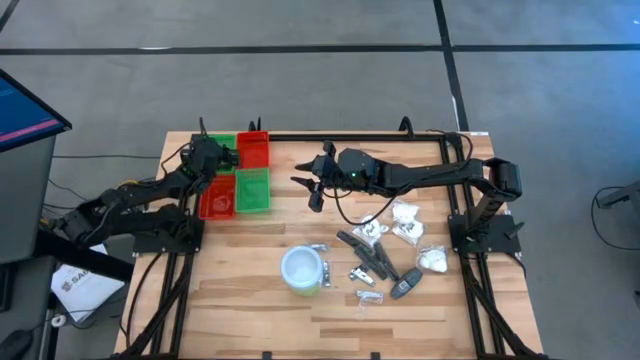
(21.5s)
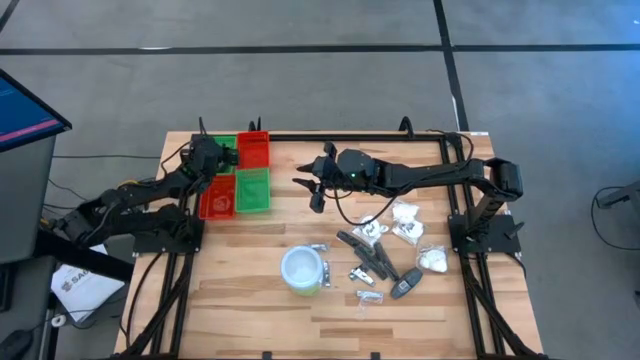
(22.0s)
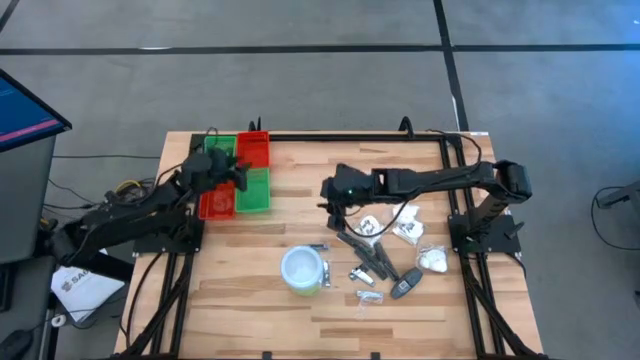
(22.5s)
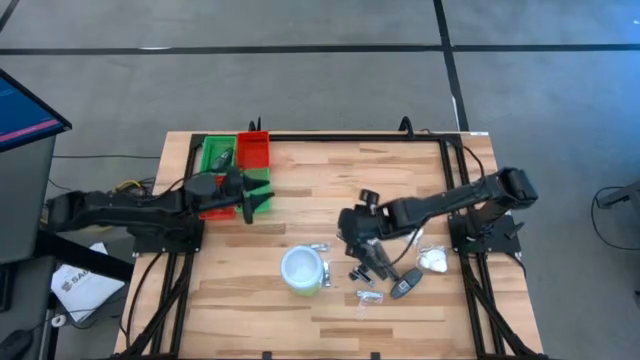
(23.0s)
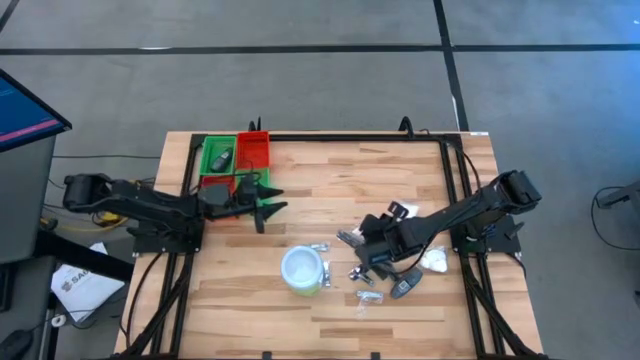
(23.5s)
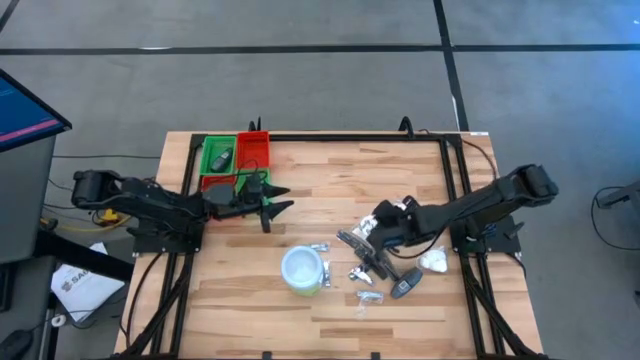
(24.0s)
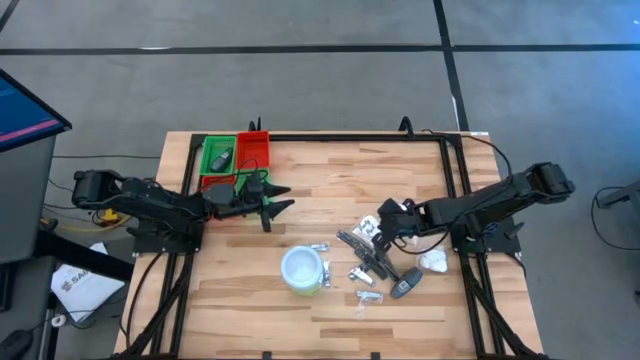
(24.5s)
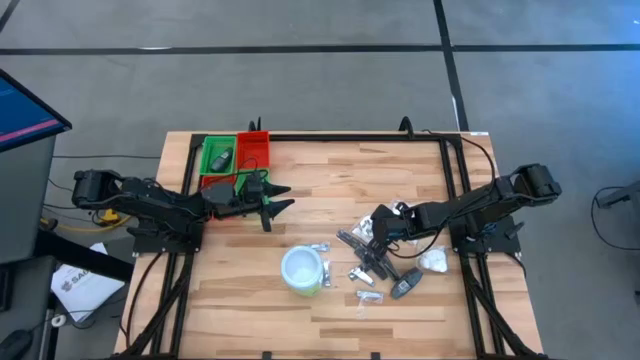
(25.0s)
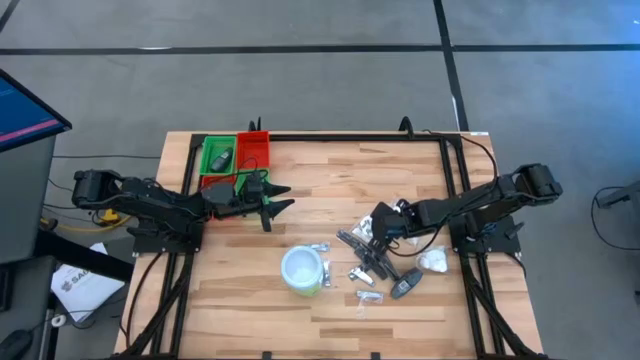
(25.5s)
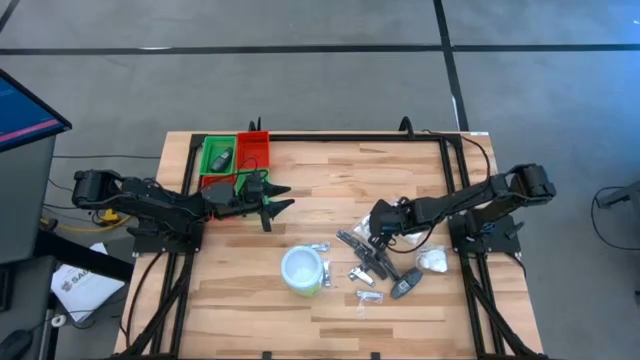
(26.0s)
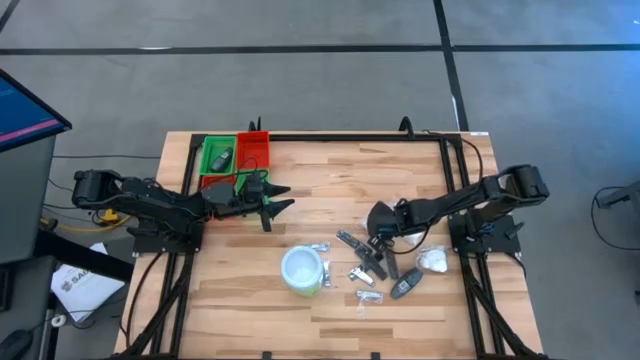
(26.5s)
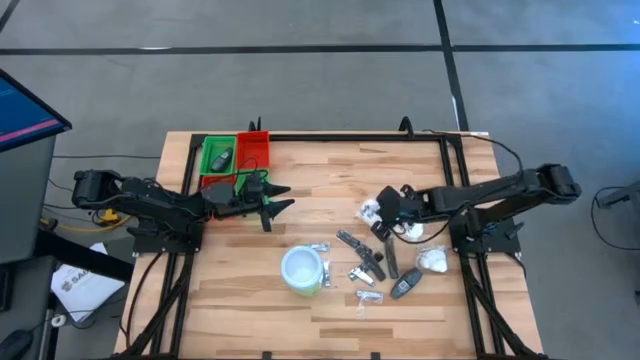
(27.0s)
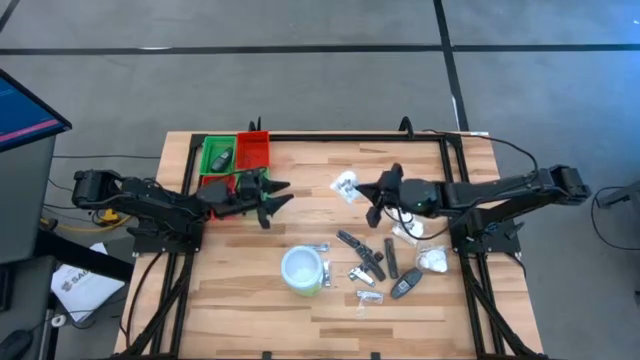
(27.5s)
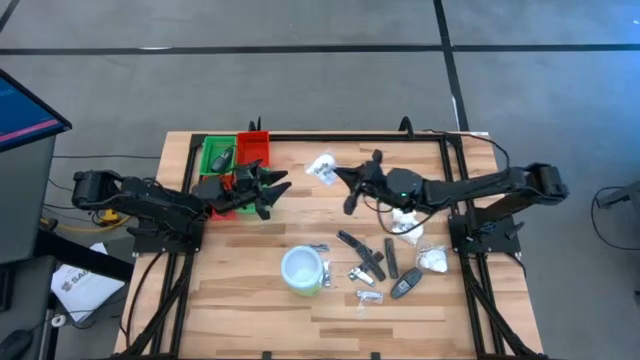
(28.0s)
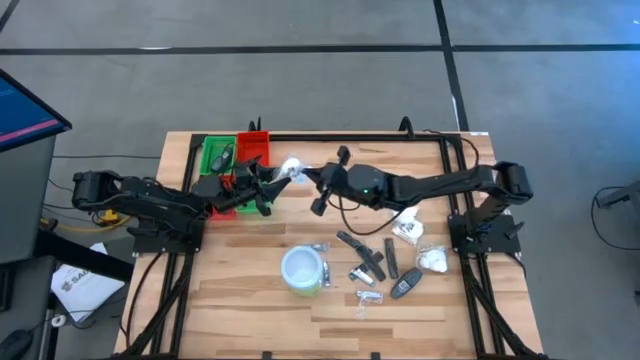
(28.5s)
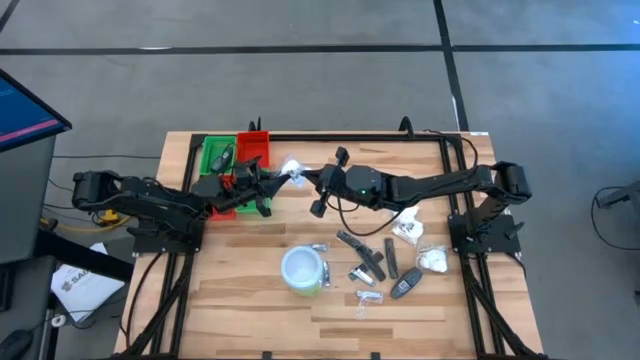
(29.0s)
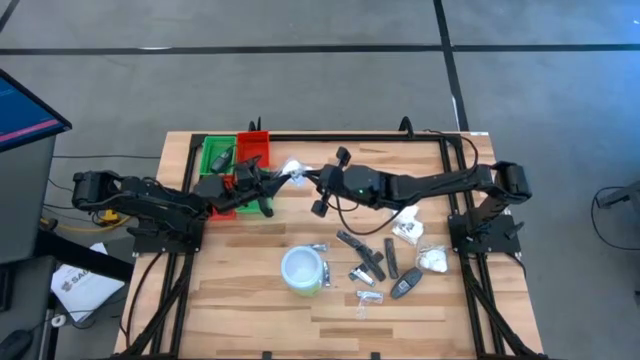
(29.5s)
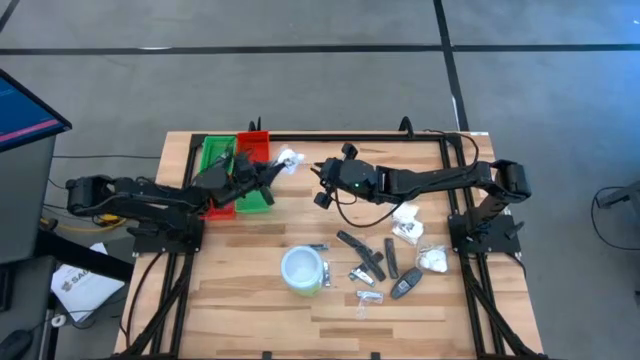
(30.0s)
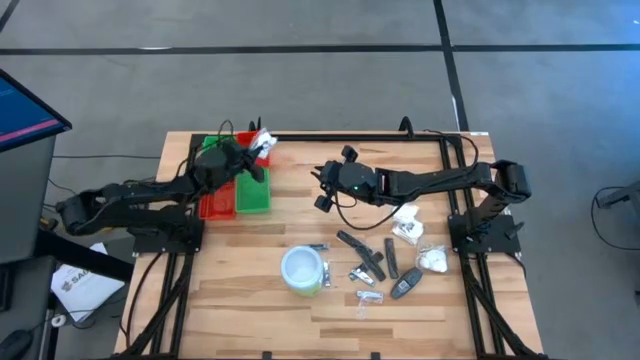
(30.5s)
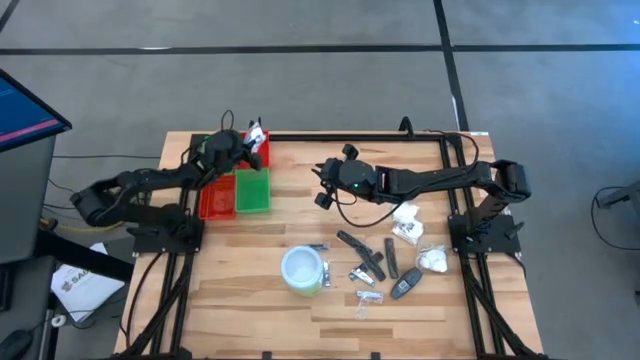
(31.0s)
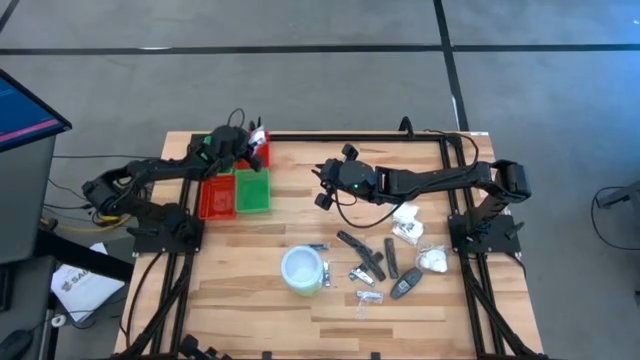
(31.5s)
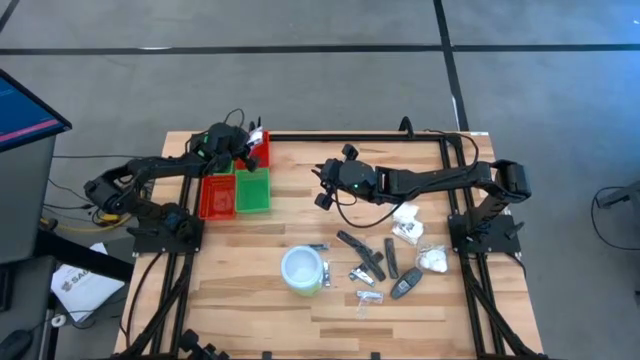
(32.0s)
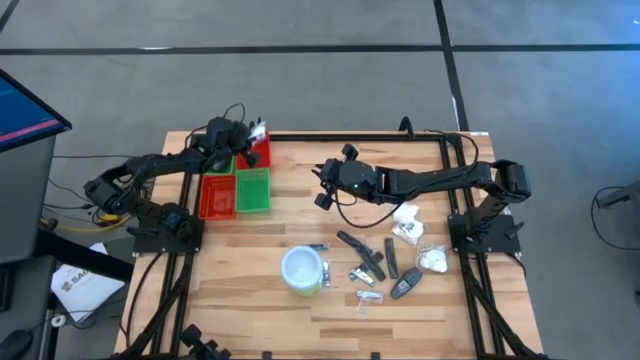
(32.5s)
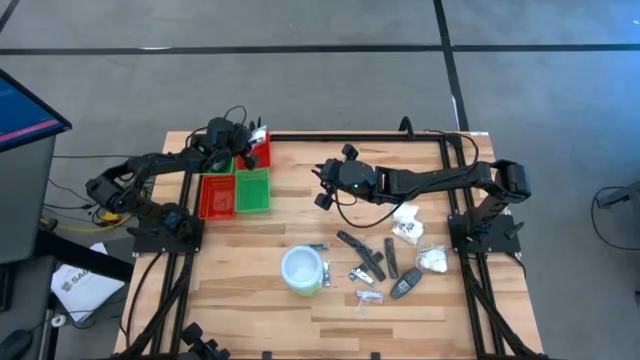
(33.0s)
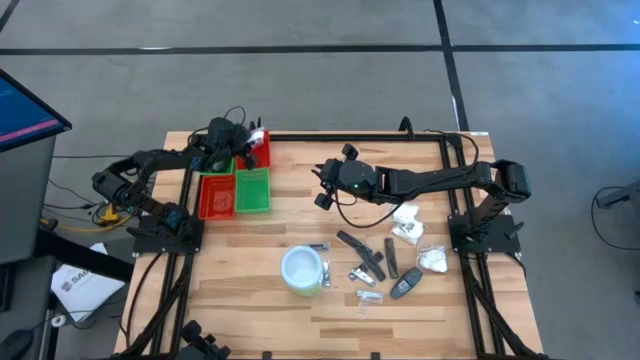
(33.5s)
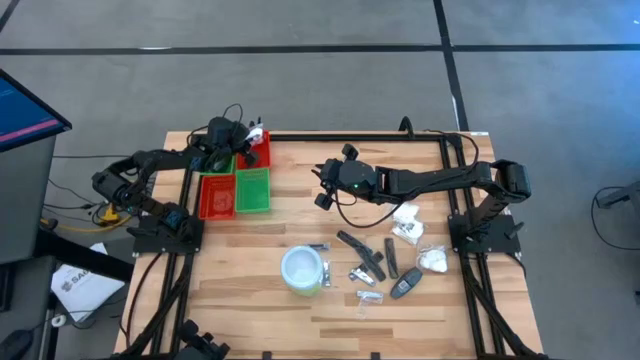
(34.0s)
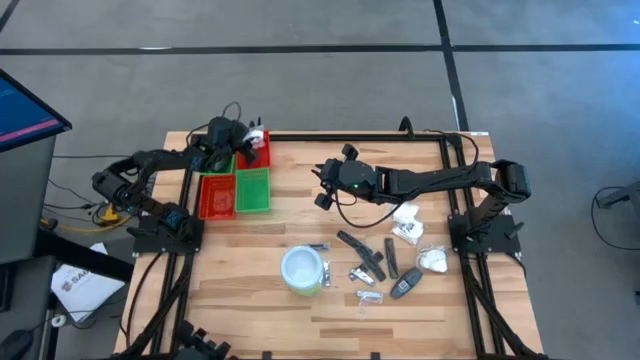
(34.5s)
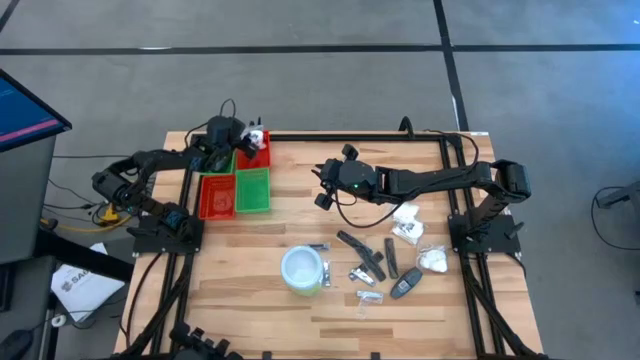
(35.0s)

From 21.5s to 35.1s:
Task: Pick & Place Travel size toiletries
Put the white cotton pack into the top red bin

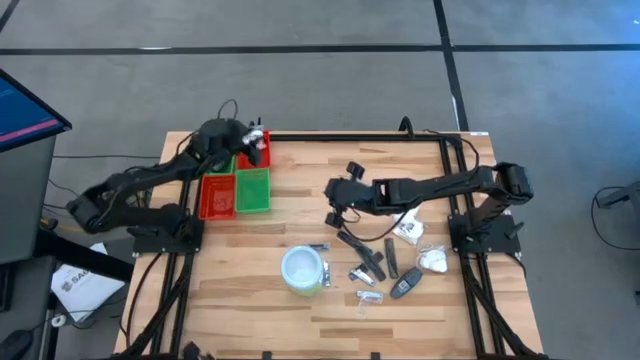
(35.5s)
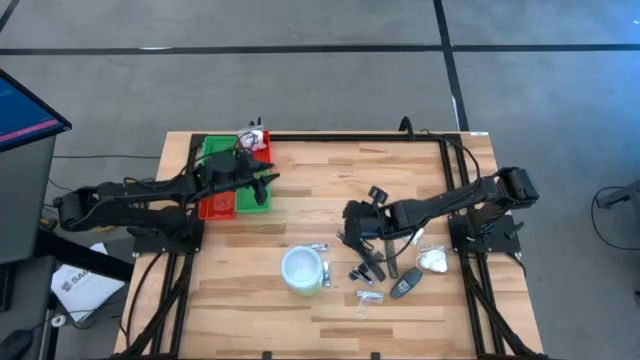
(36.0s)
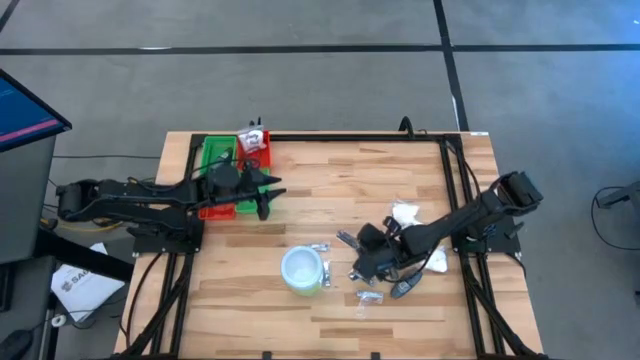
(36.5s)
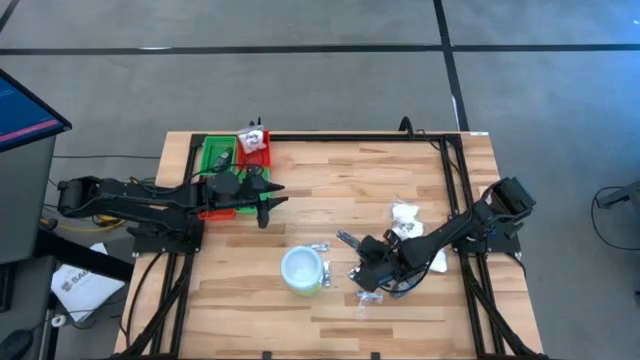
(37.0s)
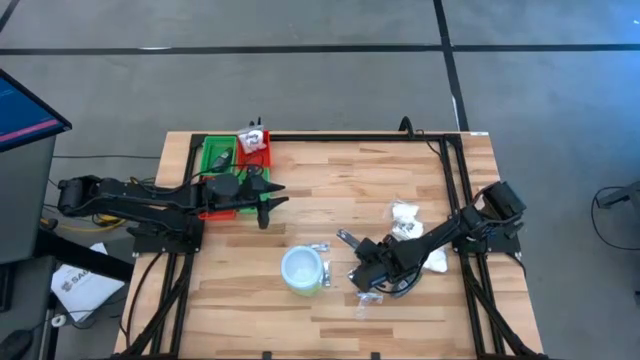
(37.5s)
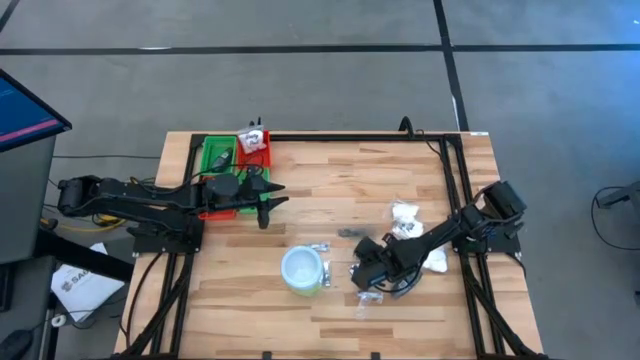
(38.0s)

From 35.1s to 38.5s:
Put the black comb into the bottom green bin

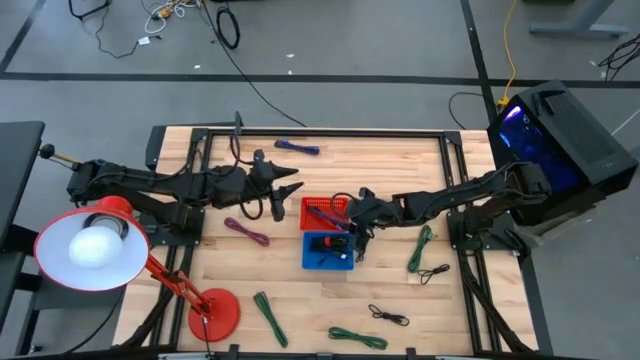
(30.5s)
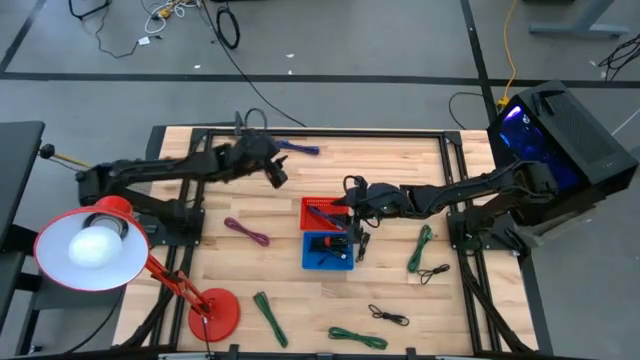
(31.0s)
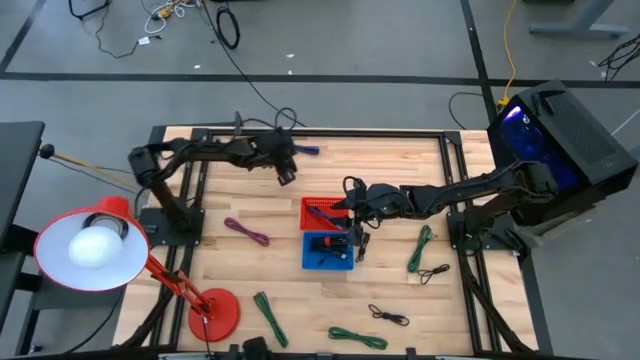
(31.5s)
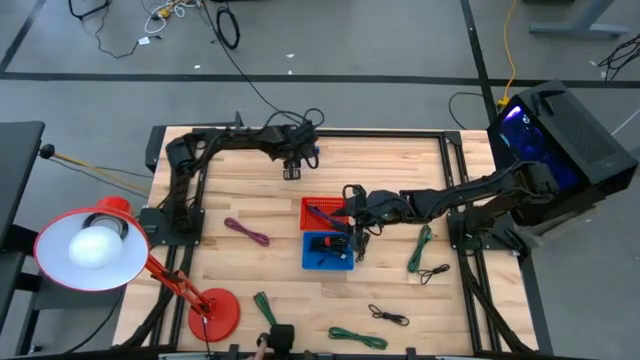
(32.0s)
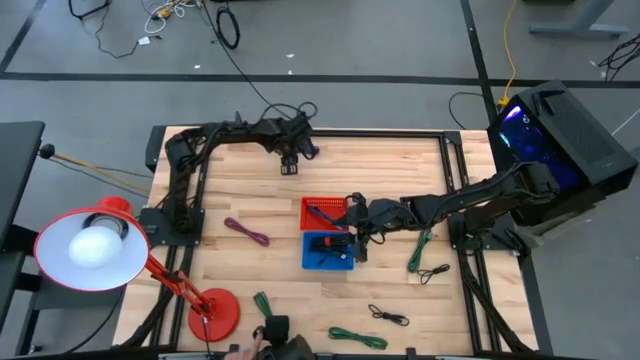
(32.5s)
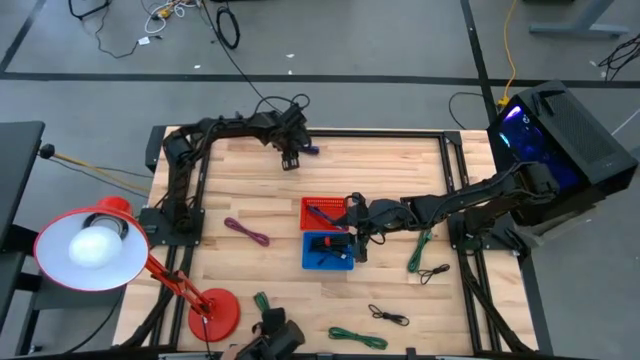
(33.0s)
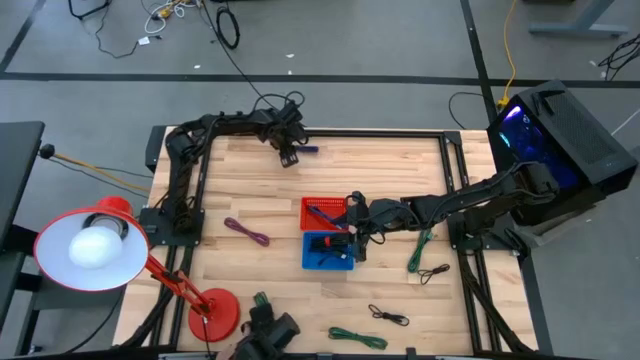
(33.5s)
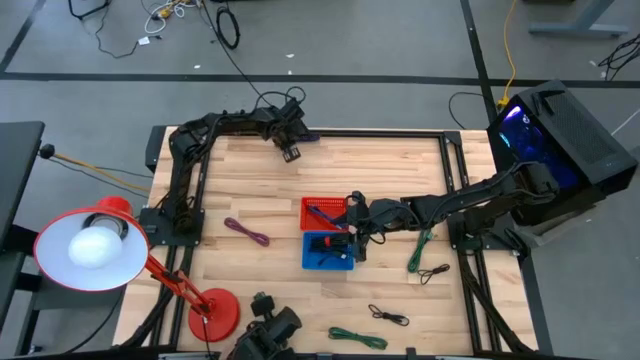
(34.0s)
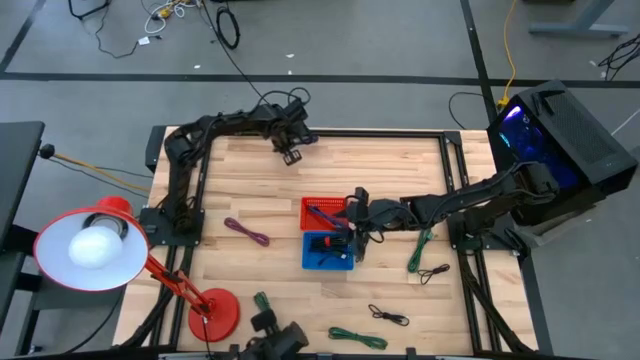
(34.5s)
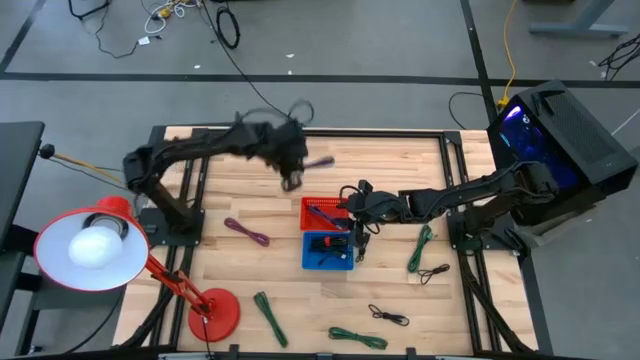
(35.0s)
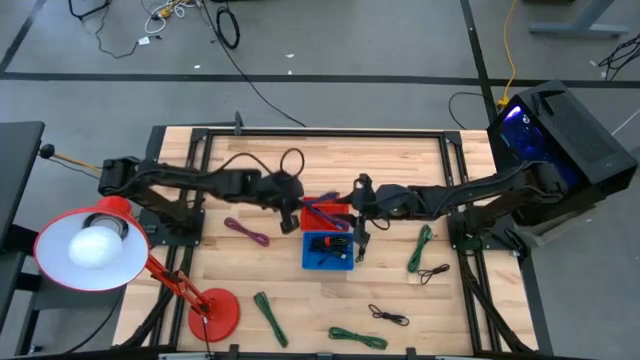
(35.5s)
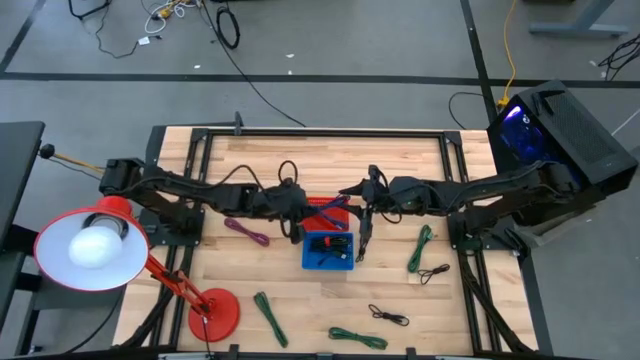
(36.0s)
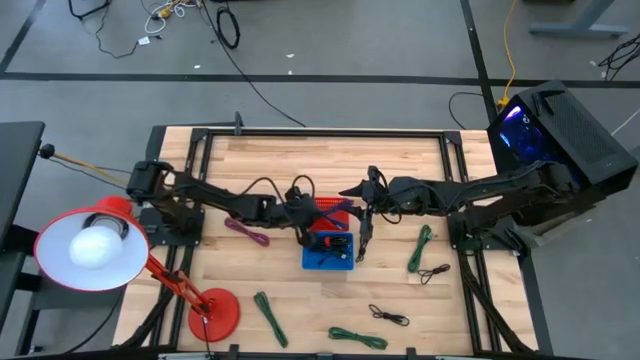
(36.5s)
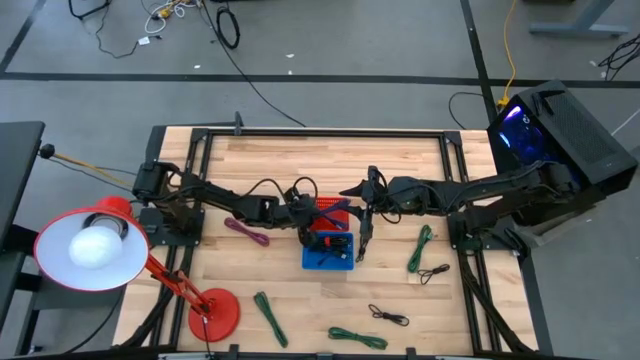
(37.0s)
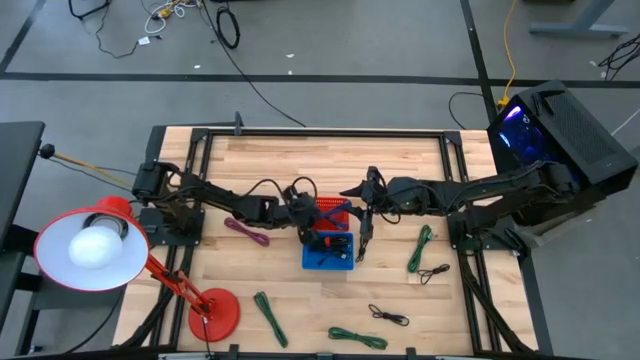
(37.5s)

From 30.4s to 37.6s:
Task: Pick & Place USB Port
Put the blue charger cable into the red bin
